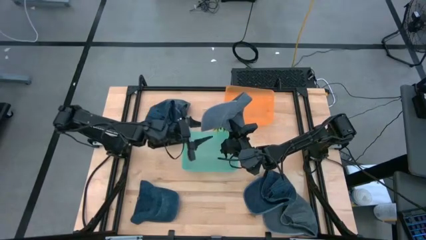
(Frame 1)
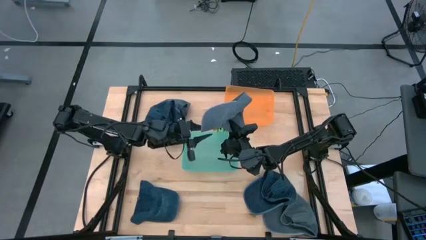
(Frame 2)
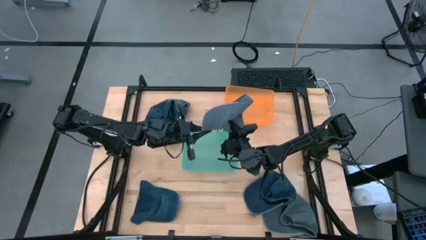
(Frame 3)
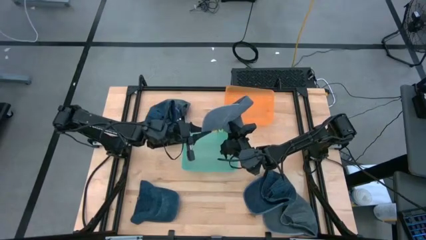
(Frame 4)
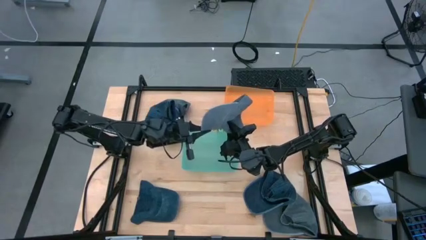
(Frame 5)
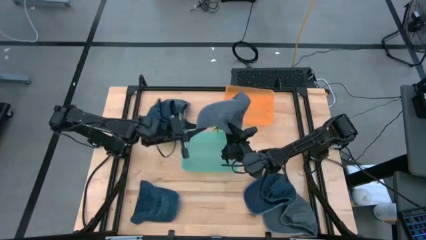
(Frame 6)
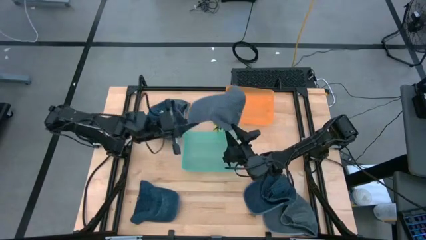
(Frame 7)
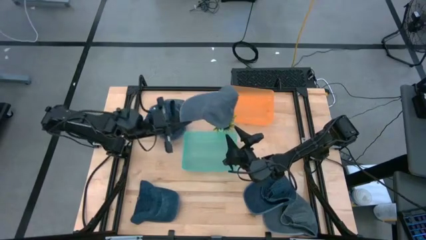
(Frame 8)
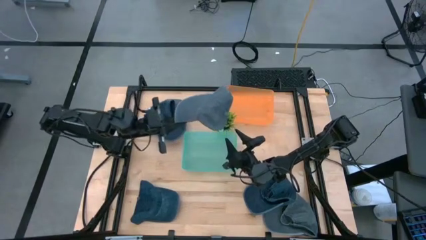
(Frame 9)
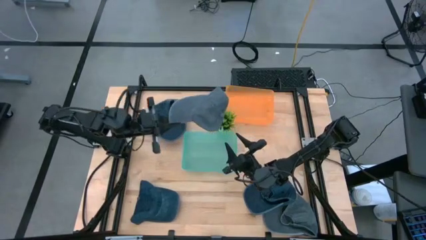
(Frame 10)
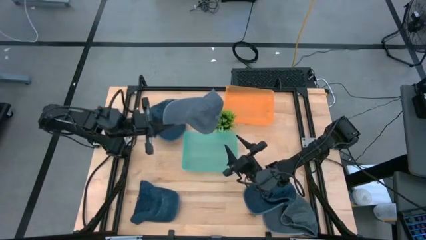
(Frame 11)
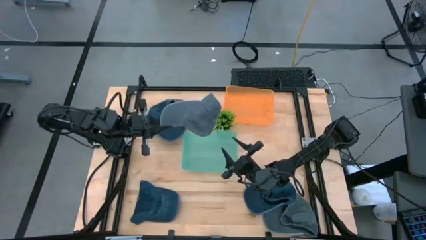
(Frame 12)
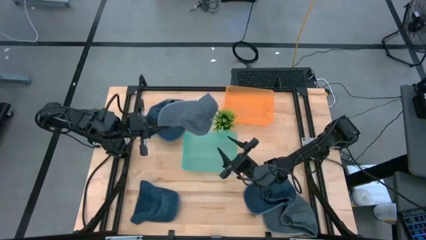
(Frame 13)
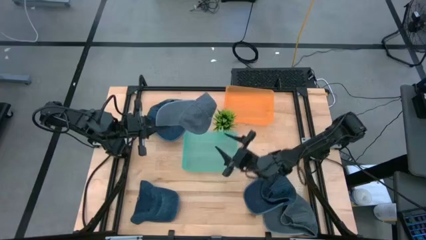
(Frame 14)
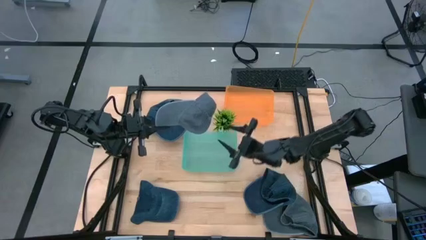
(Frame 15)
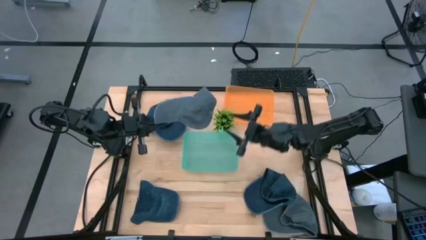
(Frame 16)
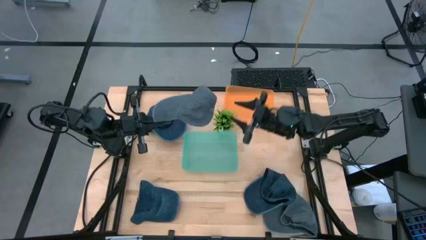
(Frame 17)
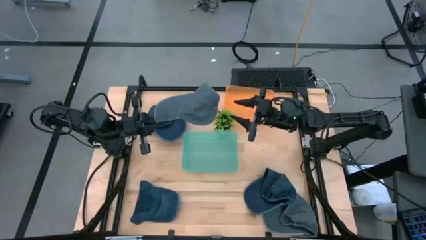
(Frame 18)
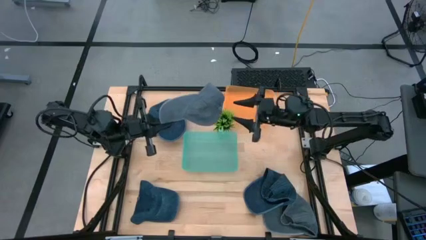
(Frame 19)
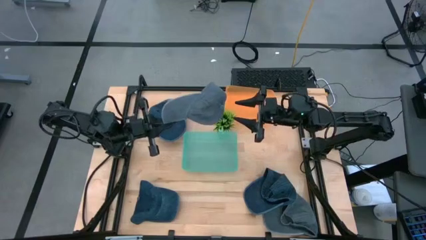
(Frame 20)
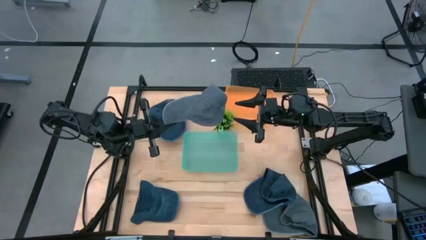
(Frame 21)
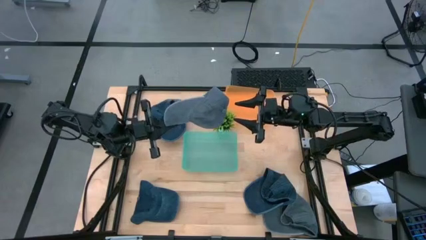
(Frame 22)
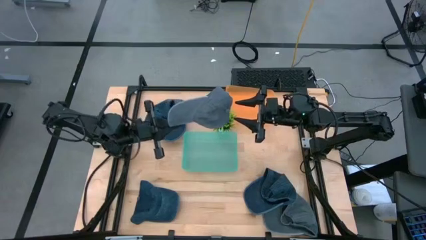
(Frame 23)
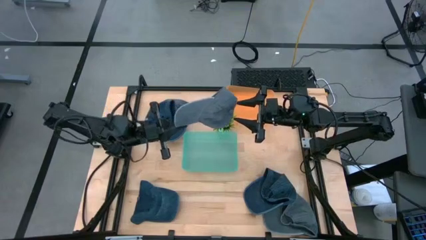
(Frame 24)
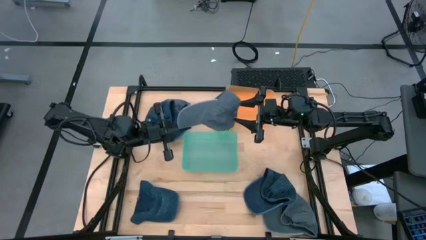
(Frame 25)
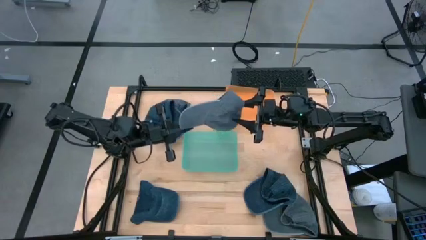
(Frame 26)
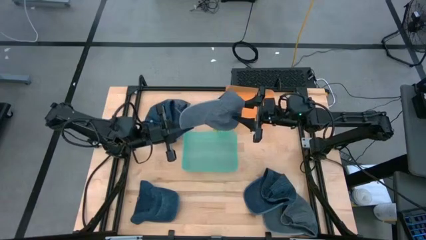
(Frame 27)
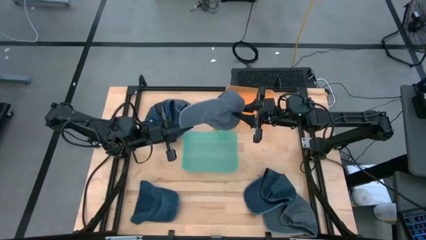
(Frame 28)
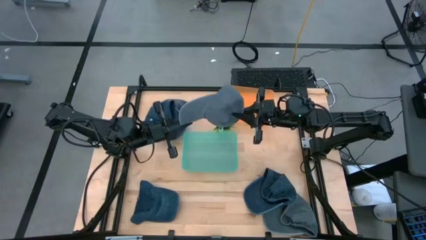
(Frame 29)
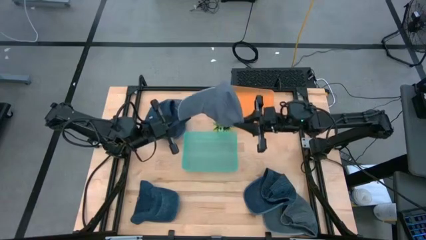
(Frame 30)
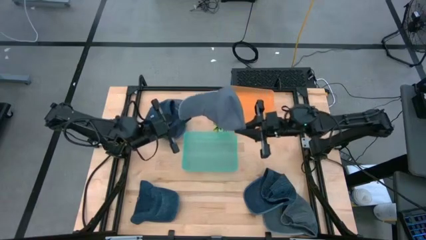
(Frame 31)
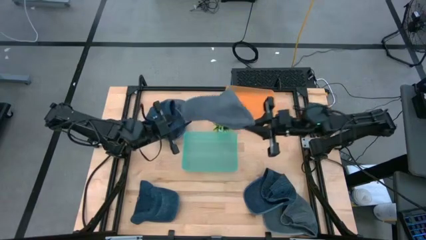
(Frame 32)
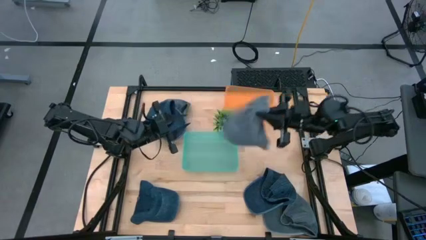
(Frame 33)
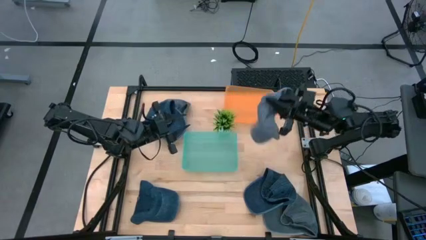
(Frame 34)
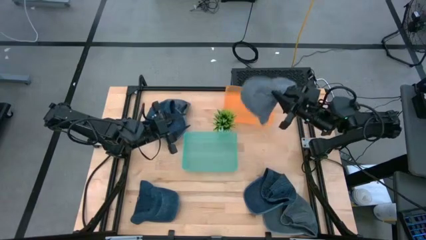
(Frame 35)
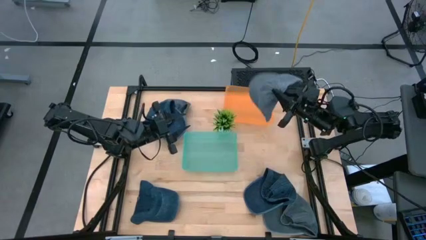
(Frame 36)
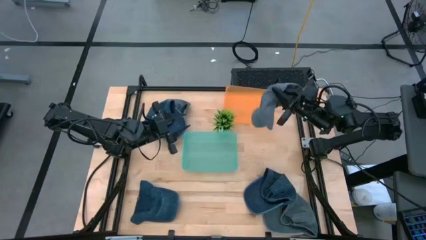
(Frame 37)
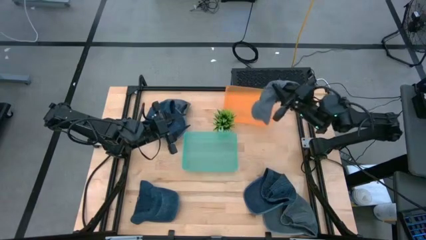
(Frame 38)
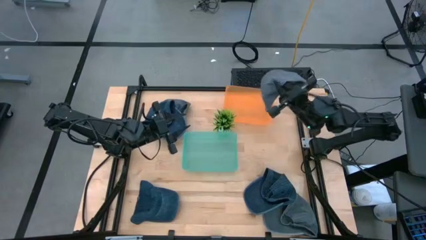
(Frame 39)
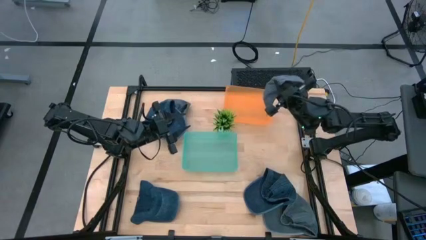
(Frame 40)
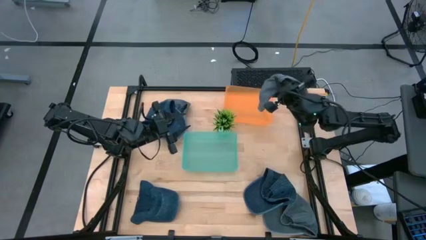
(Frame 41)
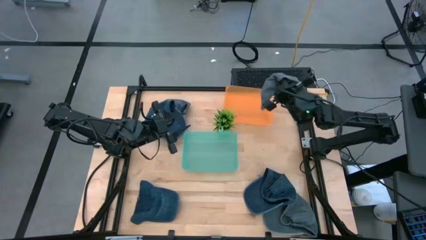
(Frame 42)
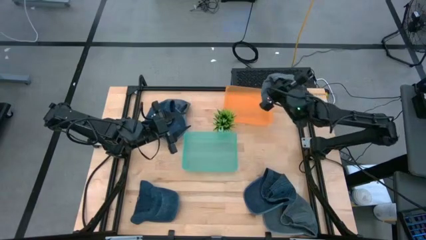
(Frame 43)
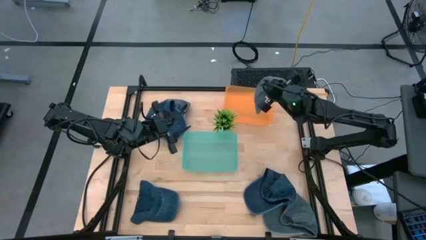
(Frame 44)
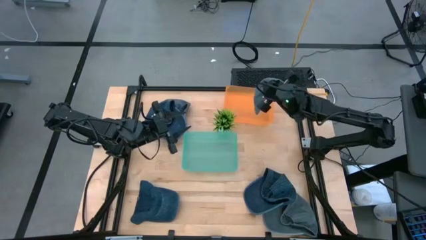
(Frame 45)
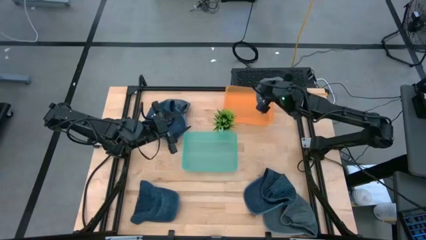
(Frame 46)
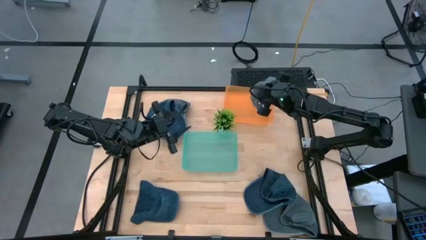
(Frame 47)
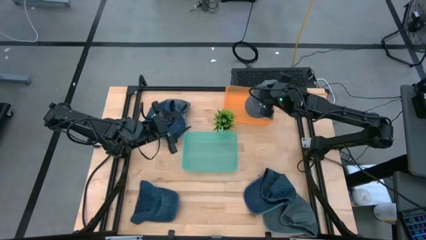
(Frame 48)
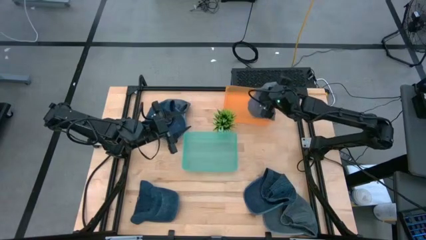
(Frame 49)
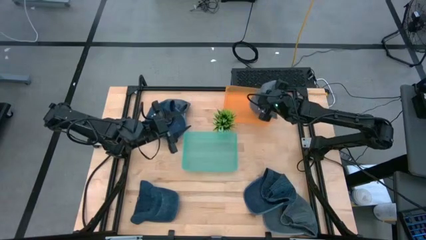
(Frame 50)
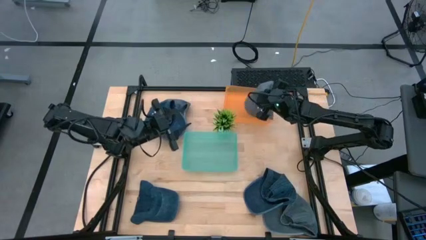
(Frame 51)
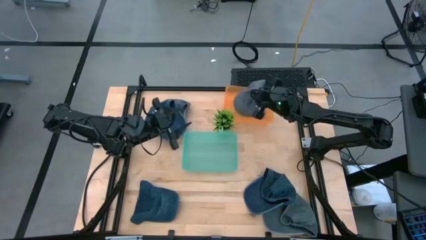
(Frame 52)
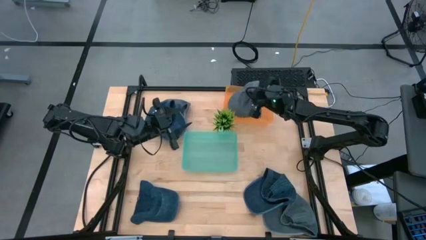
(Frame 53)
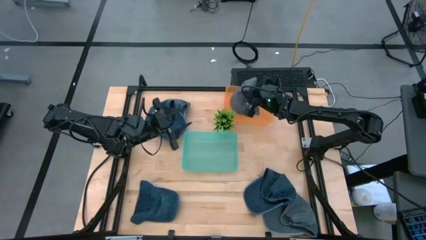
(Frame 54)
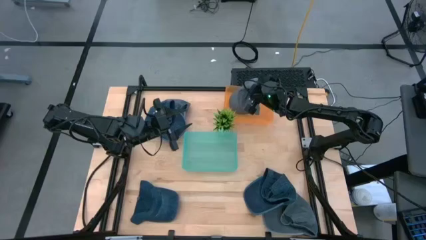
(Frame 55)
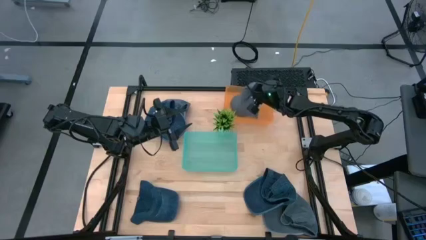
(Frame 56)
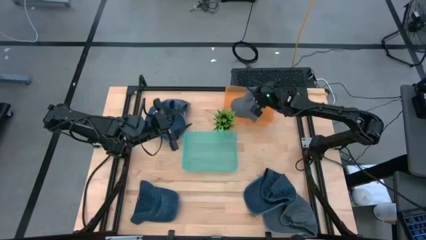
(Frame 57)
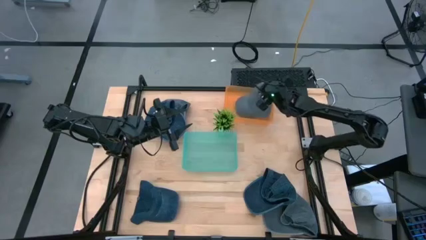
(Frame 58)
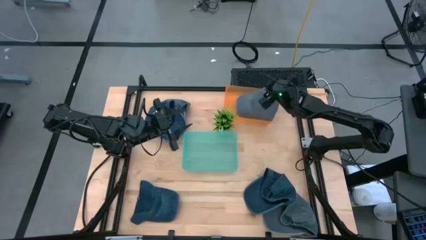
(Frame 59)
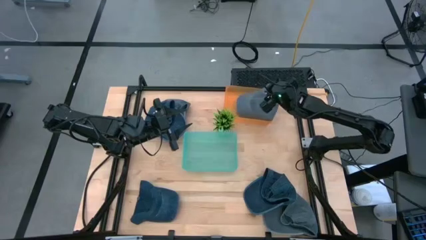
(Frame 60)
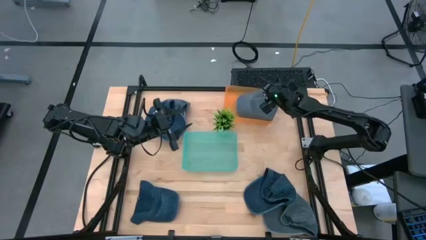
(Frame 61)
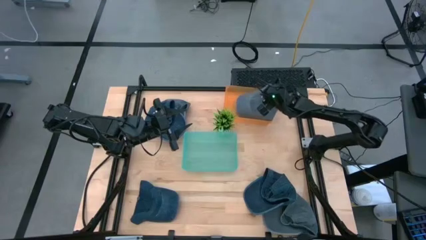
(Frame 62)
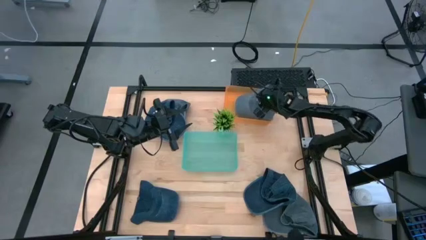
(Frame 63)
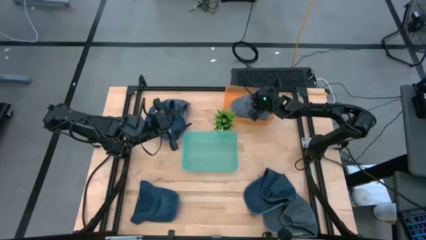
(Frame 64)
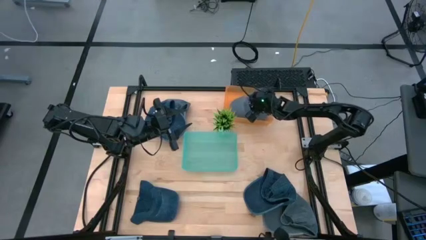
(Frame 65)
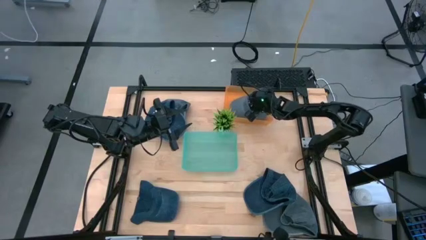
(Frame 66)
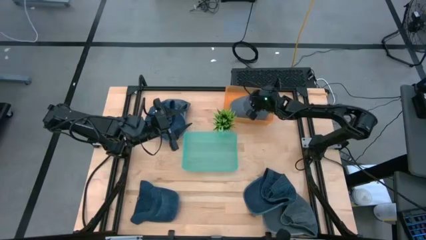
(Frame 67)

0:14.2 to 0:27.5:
Task: Pick & Place hat
Put the middle gray cap into the orange bin

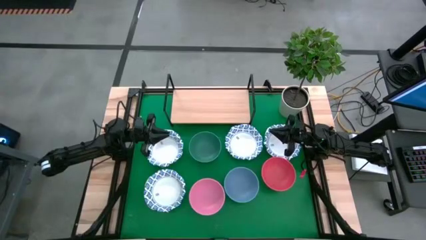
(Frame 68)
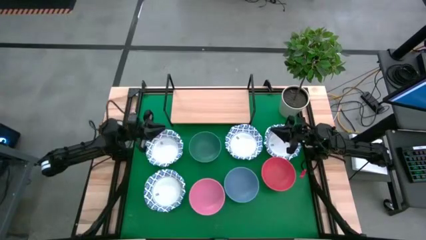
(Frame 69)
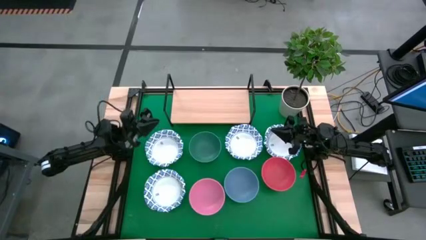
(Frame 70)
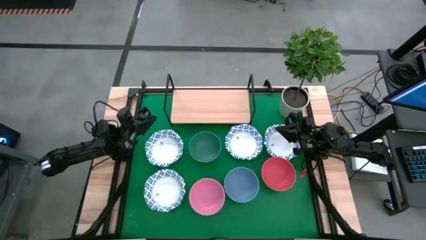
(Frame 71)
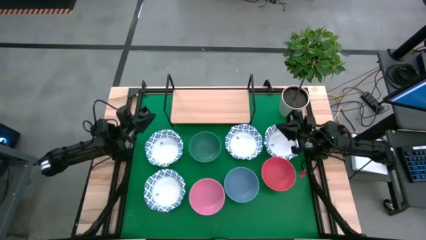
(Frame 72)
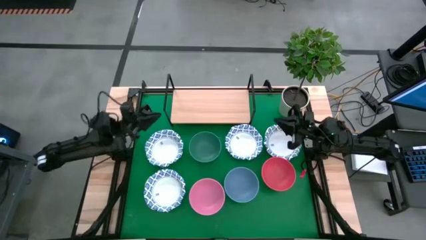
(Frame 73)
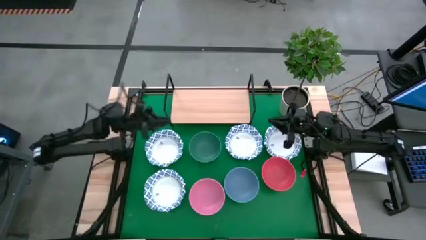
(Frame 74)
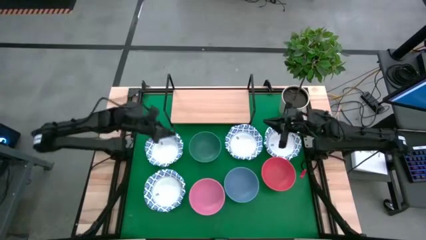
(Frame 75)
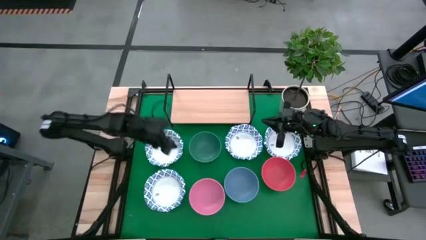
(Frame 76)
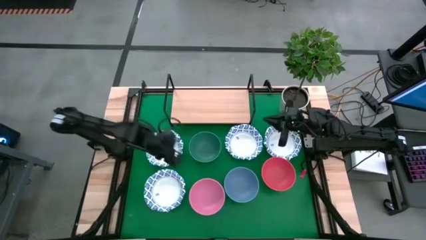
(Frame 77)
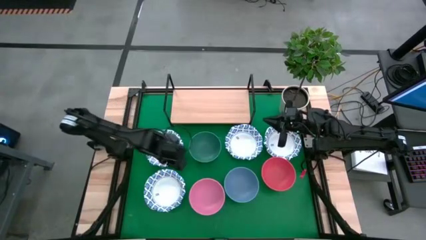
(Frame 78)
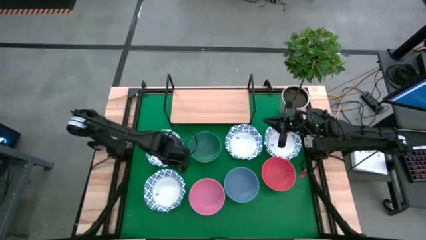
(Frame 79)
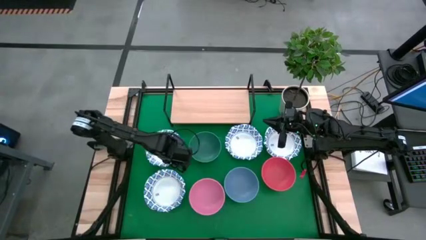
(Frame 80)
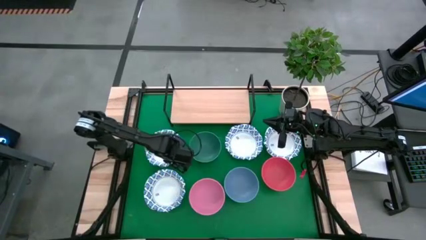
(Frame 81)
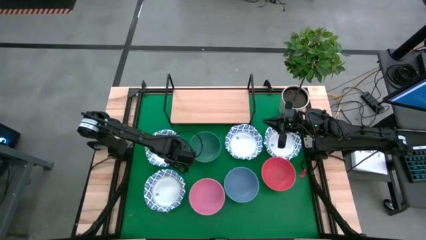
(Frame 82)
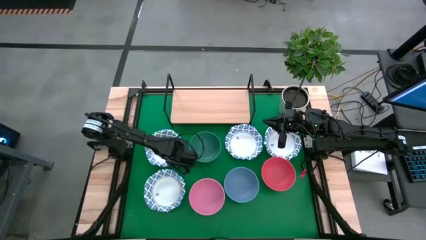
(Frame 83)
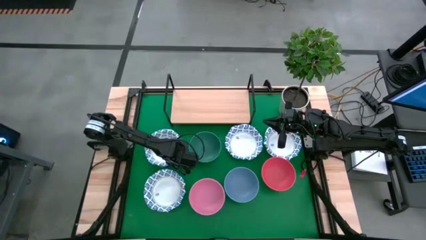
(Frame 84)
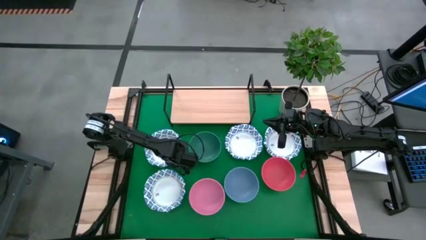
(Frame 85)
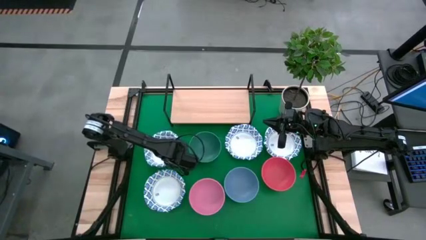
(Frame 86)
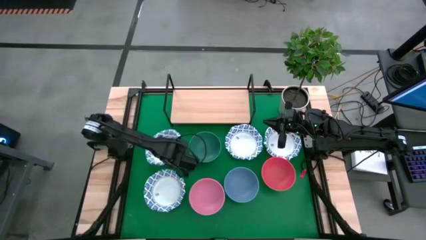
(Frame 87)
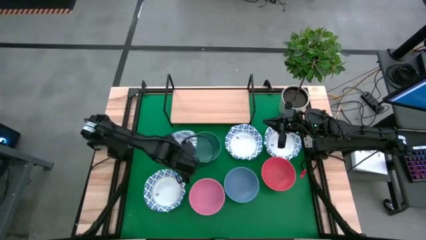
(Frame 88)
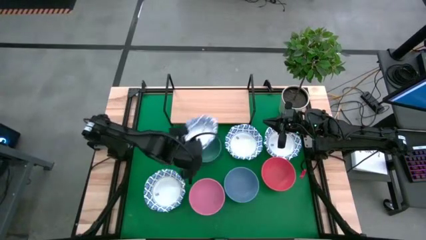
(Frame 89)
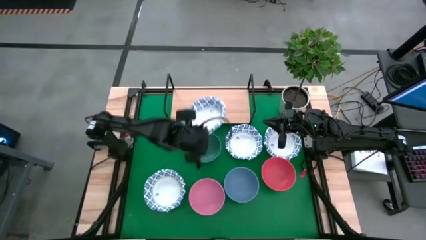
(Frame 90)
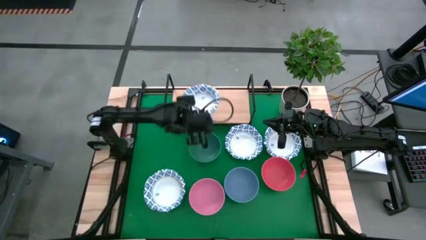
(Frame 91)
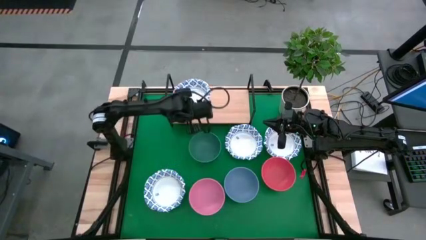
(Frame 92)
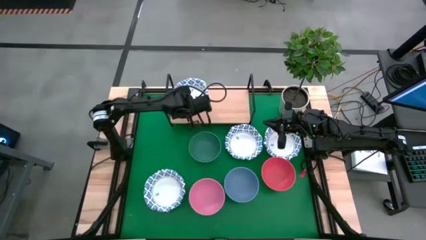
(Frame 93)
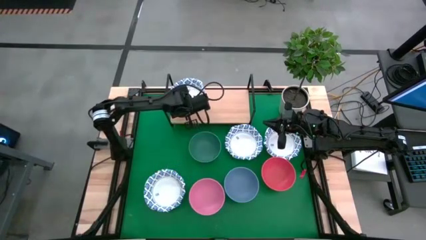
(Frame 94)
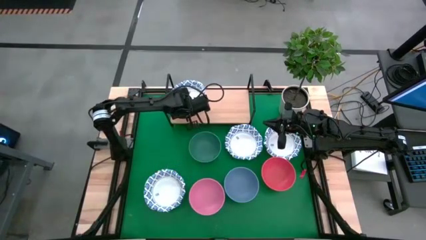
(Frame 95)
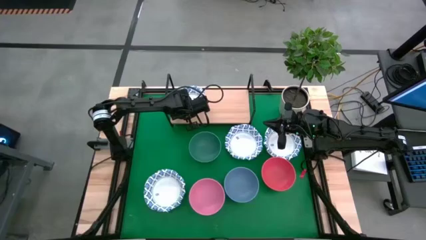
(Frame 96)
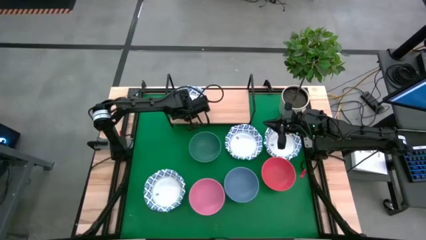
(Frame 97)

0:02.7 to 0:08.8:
Task: Place and stack bowls onto a shelf
Put the white patterned bowl on the shelf
